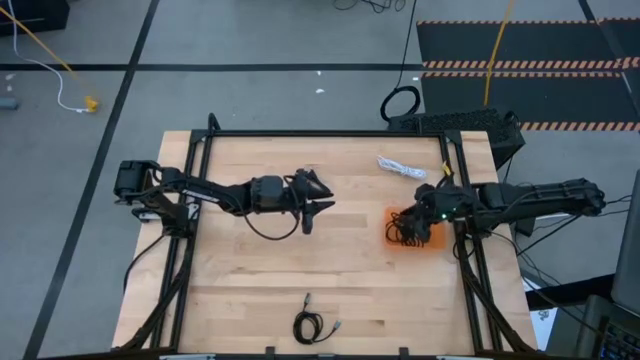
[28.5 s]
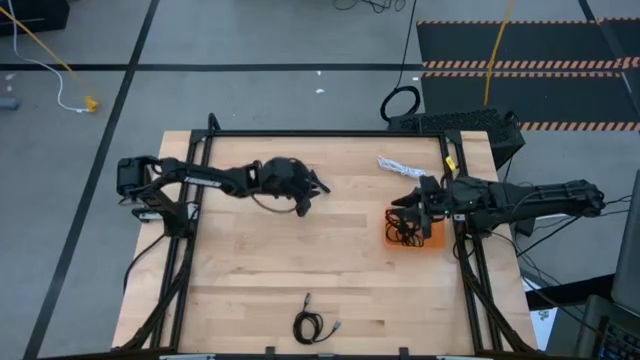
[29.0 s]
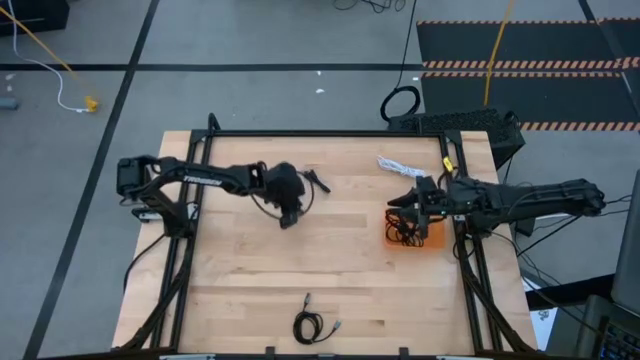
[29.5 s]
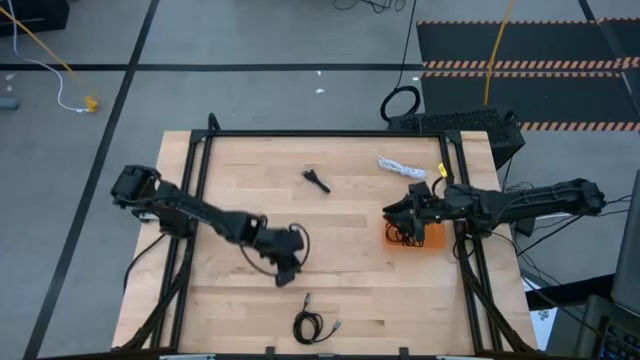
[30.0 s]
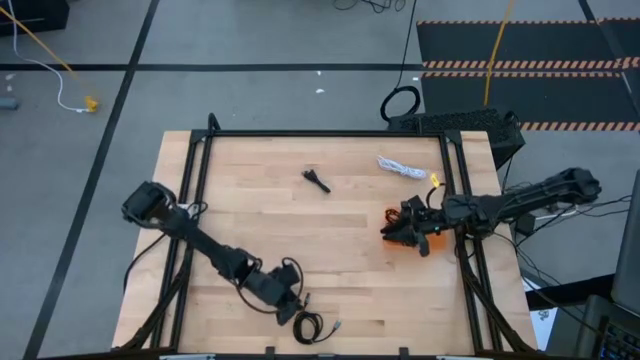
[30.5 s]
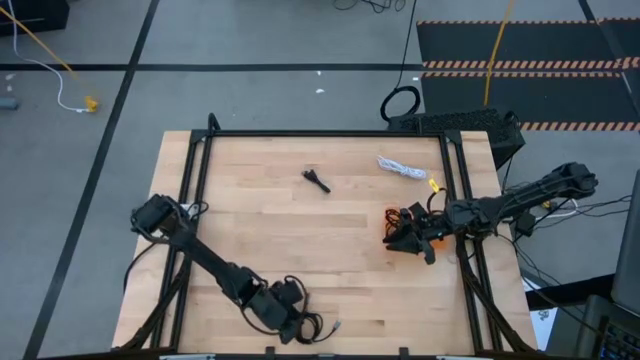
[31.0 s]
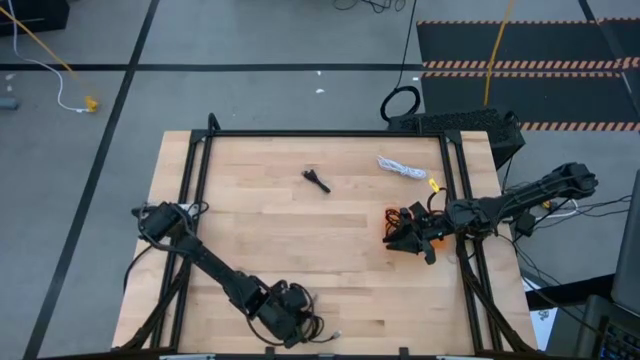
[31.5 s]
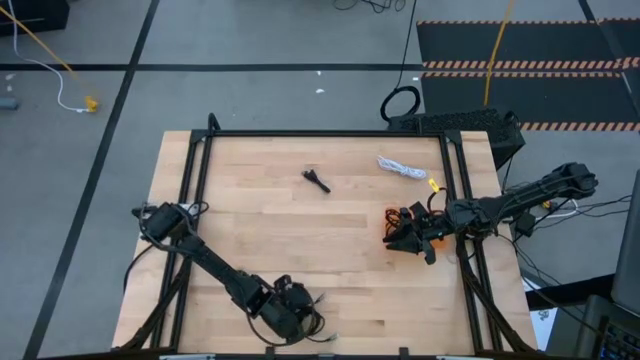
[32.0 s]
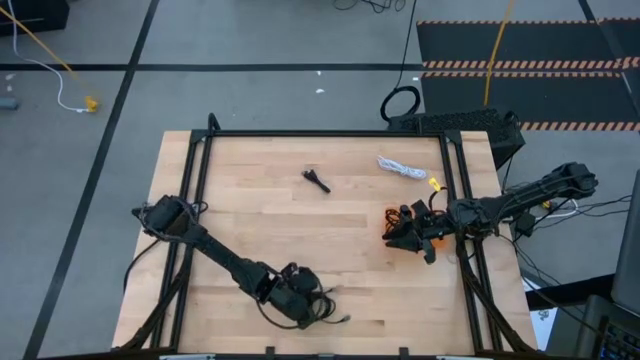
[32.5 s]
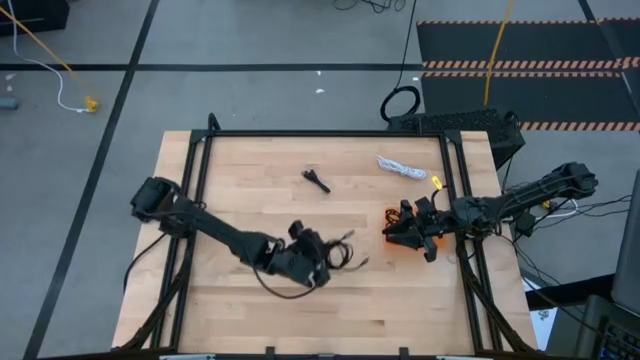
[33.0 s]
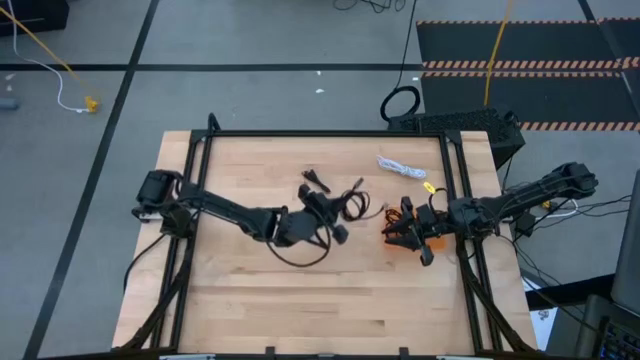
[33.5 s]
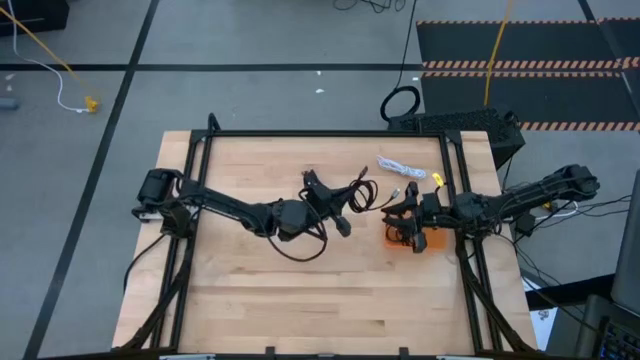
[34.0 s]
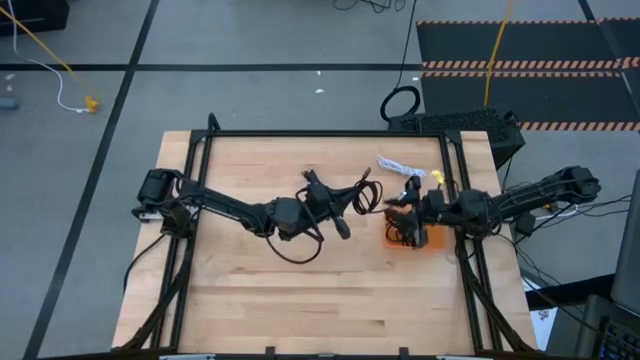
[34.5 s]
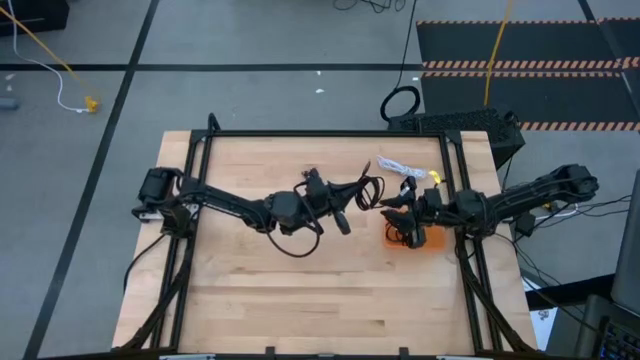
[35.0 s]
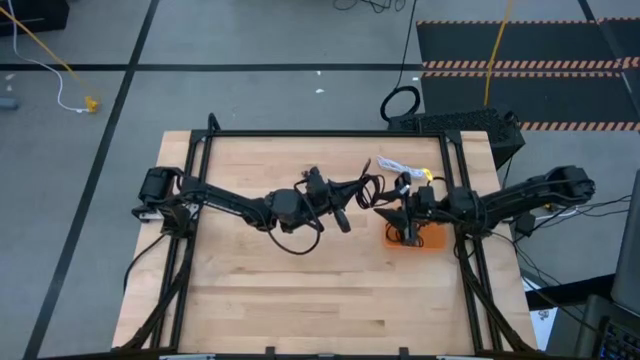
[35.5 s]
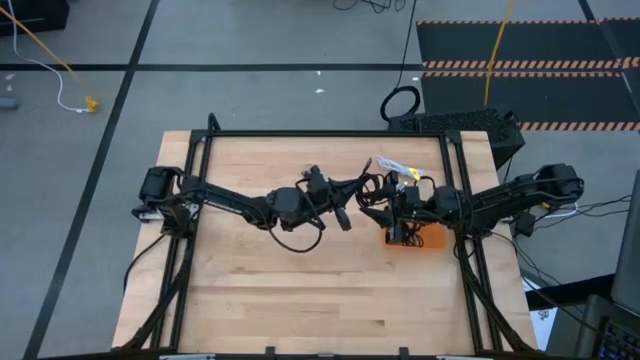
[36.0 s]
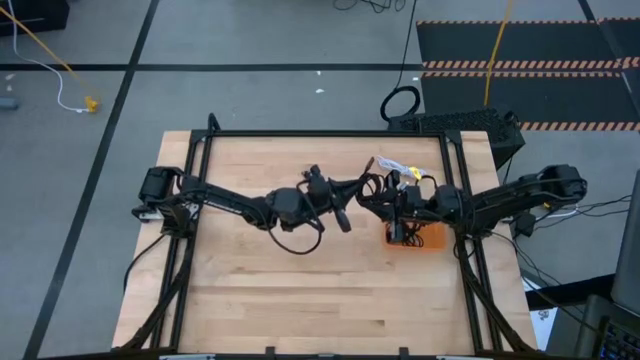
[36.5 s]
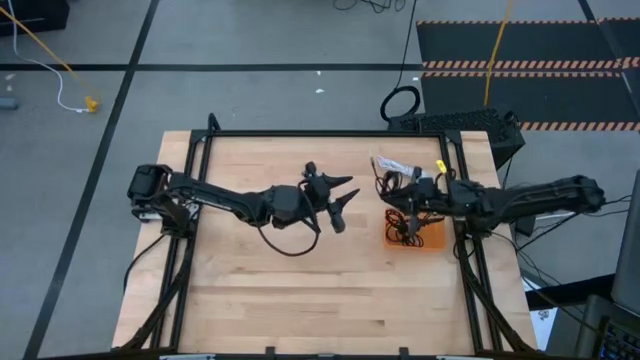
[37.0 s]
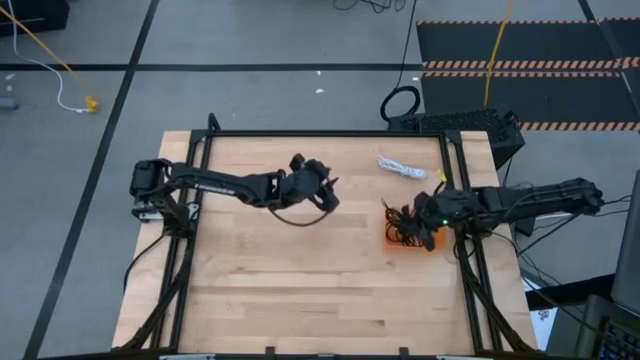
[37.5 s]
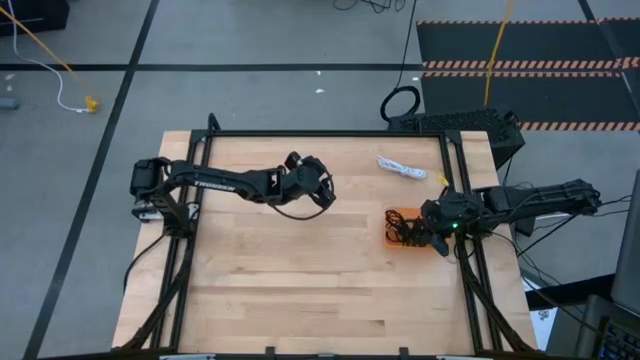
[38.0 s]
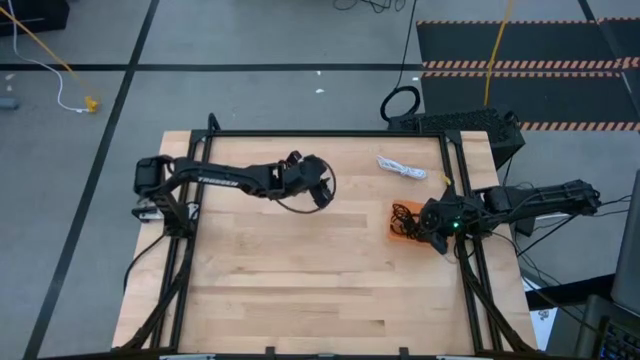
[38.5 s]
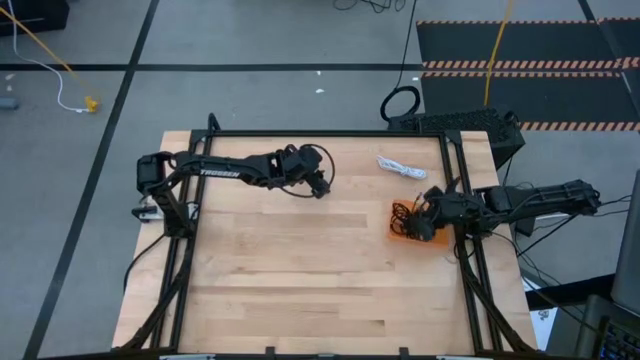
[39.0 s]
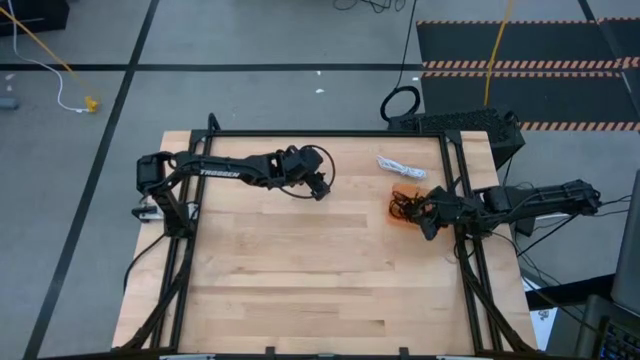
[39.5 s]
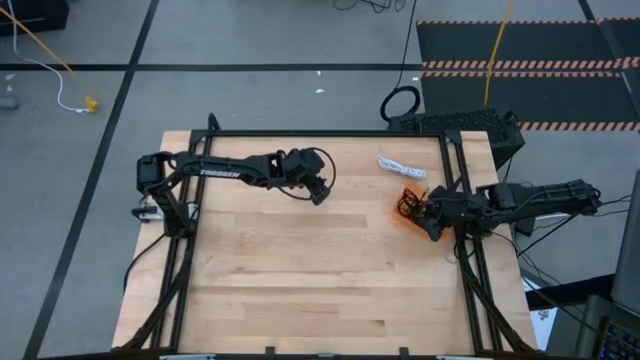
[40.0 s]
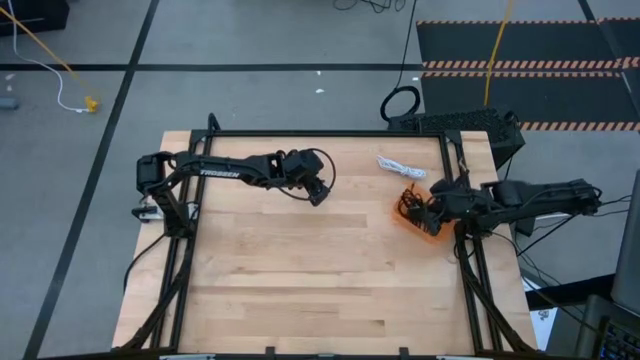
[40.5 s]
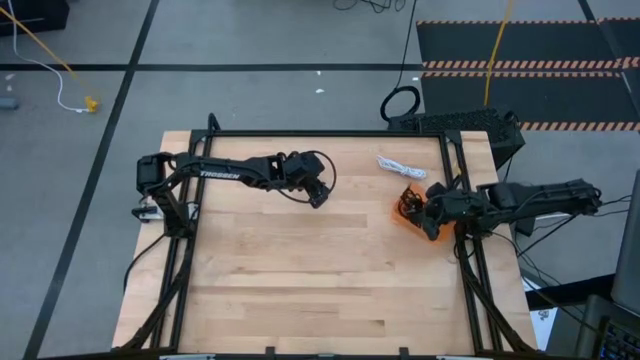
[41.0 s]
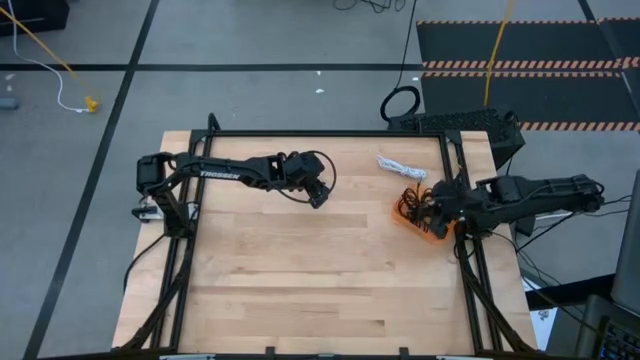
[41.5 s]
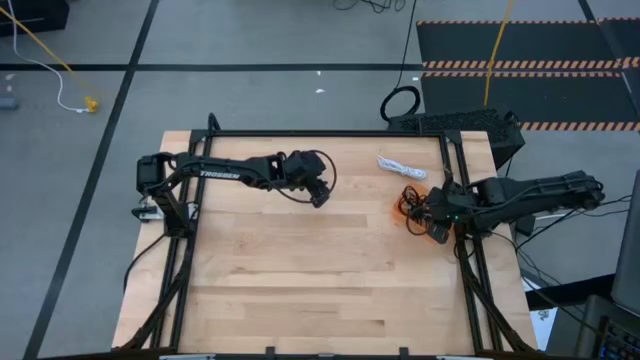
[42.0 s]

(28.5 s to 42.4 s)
Task: Pick and place USB-C Cables
Put the bottom black charger cable into the orange bin

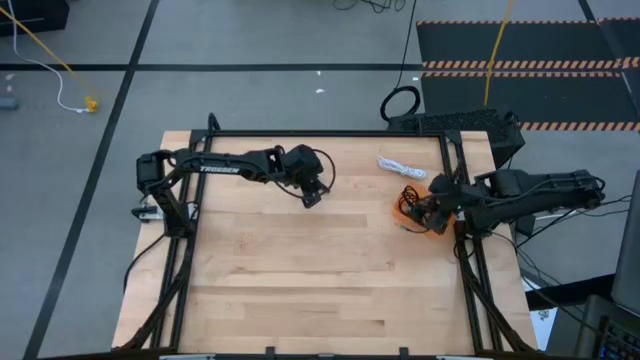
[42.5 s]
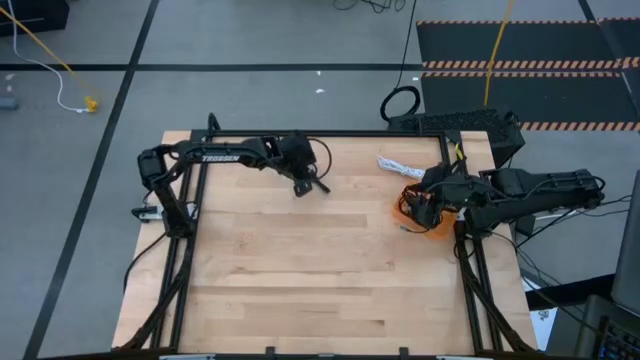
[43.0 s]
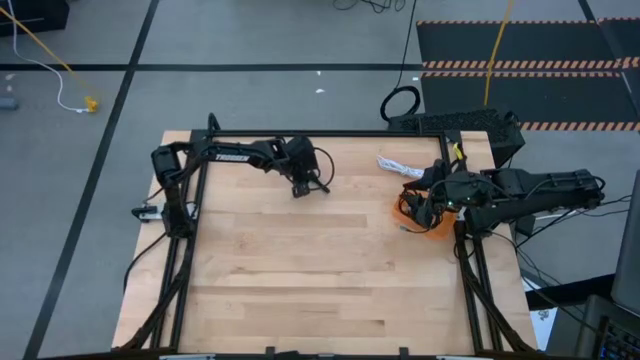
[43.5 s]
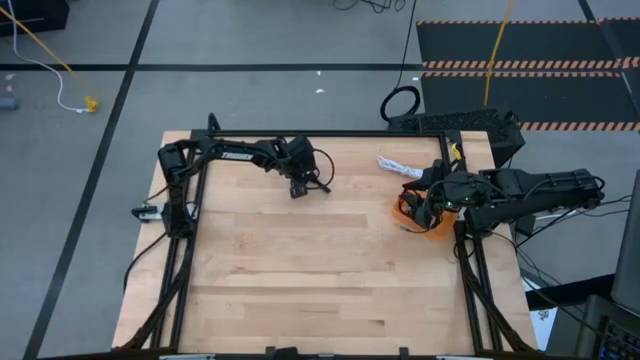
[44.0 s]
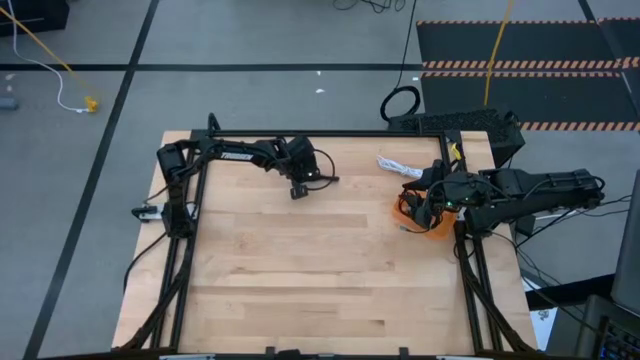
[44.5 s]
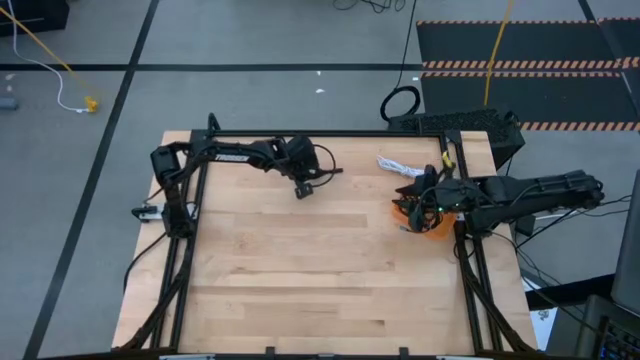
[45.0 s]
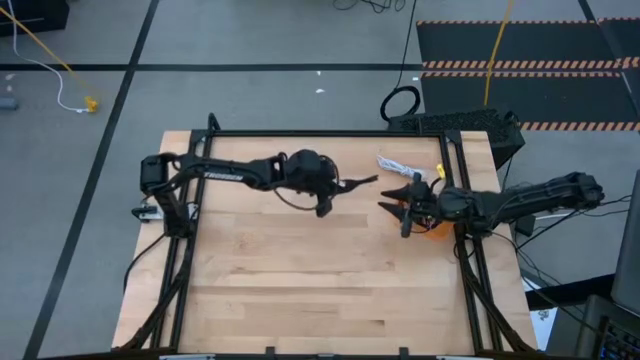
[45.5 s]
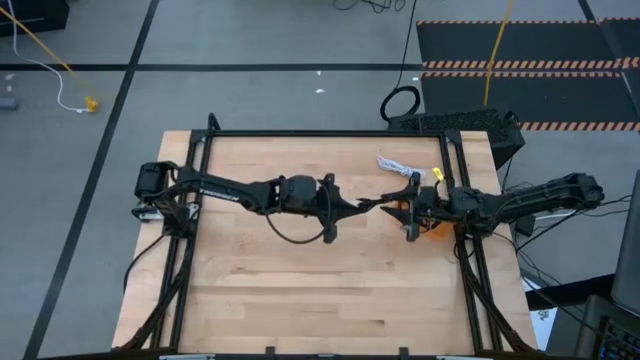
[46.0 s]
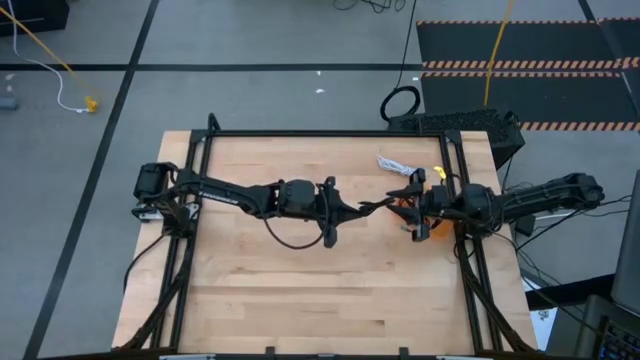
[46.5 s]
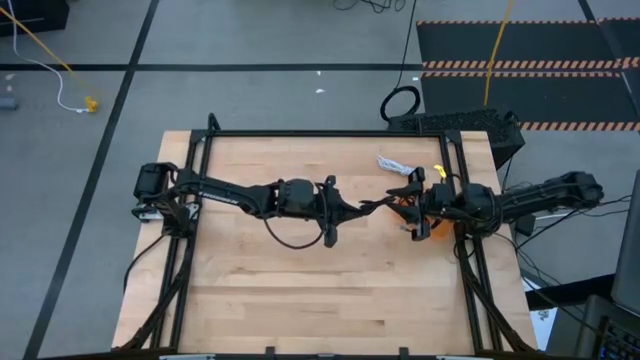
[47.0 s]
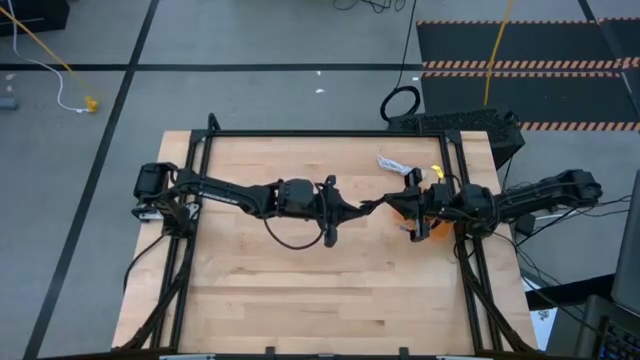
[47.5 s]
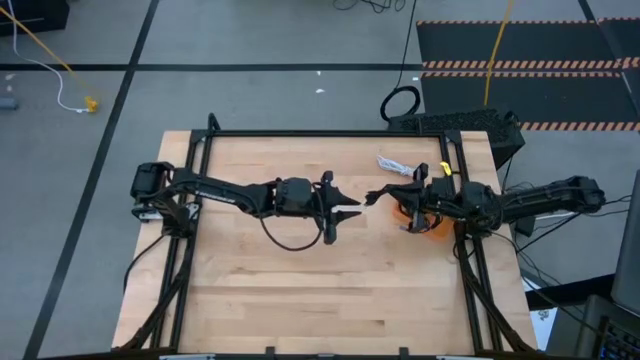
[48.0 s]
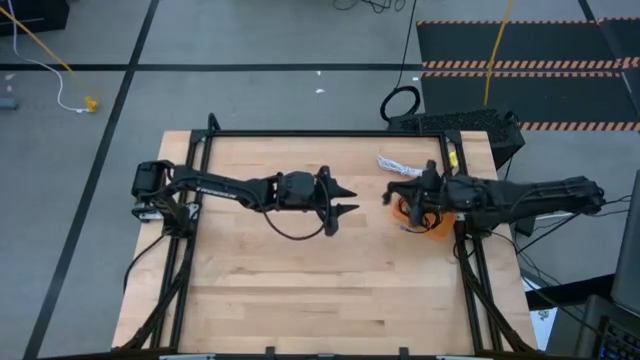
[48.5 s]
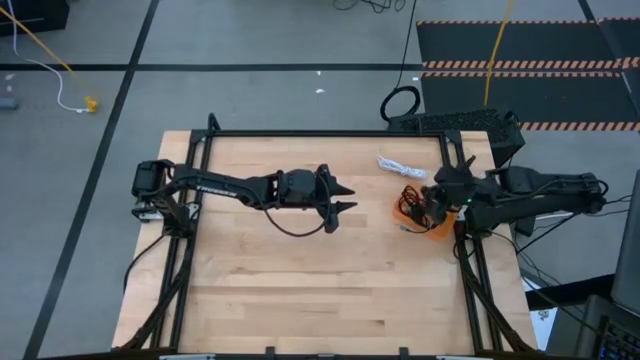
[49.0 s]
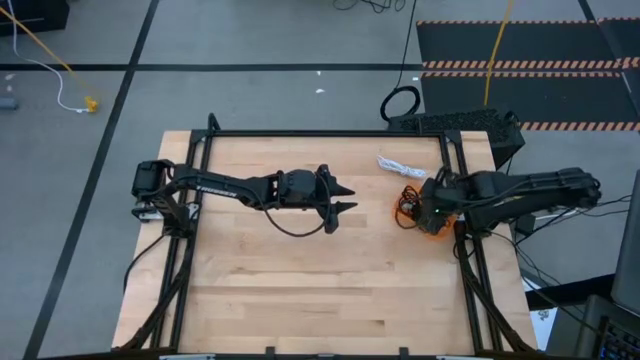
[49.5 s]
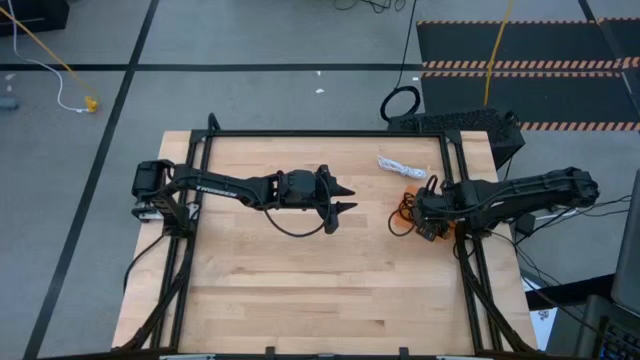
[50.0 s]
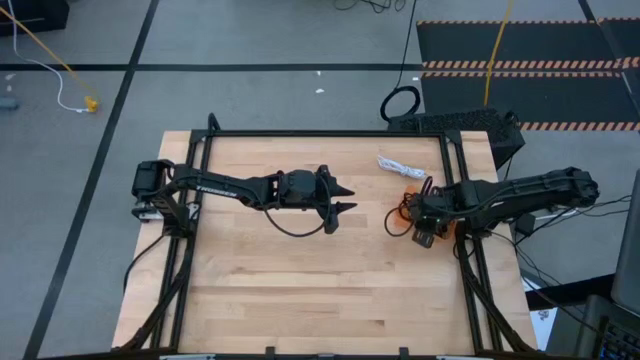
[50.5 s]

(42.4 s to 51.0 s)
Put the black charger cable into the orange bin
